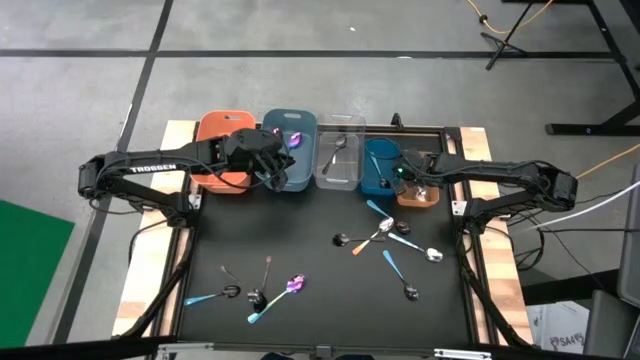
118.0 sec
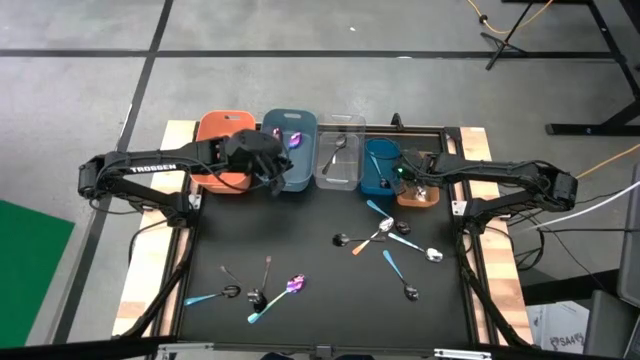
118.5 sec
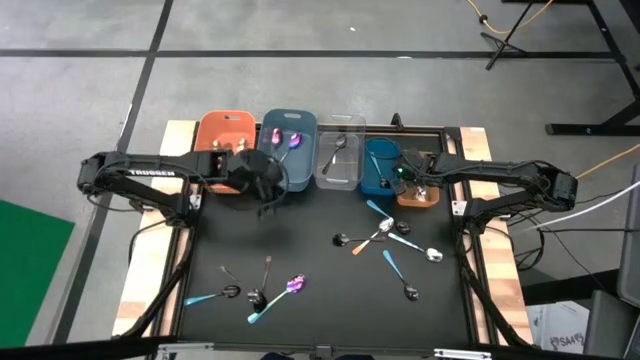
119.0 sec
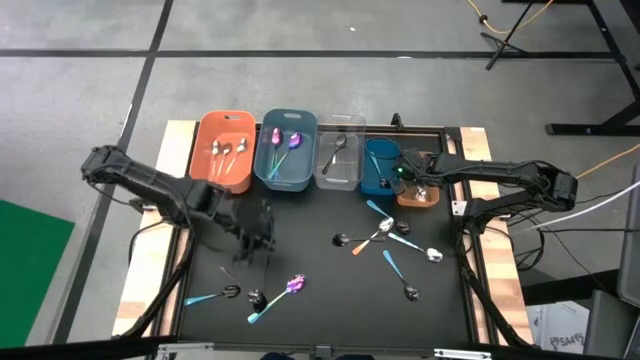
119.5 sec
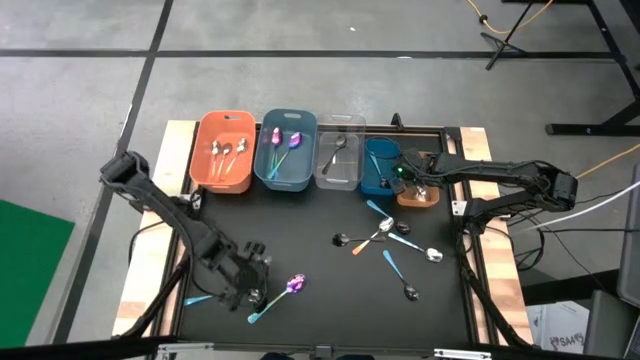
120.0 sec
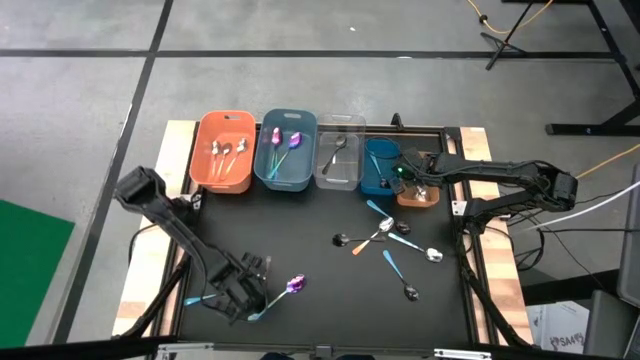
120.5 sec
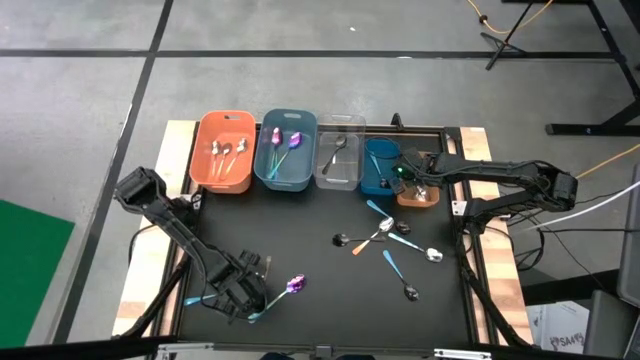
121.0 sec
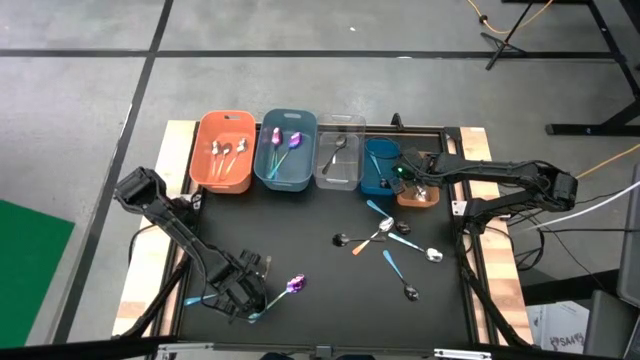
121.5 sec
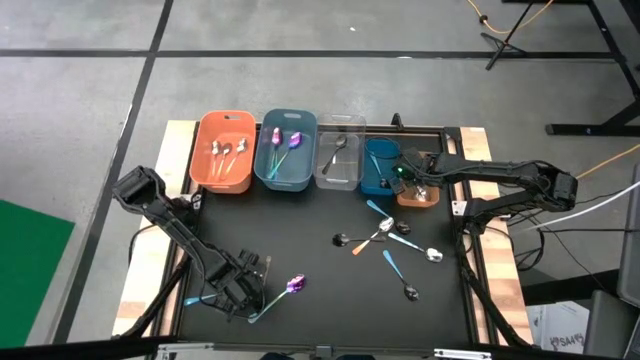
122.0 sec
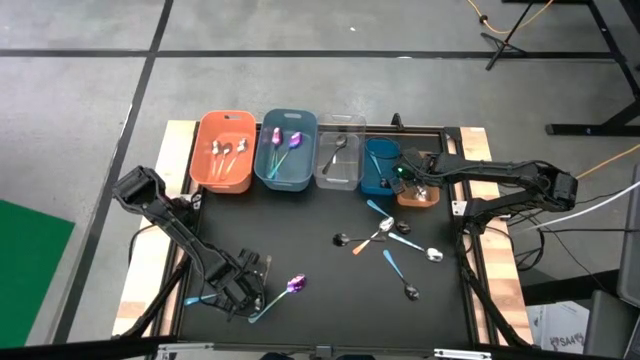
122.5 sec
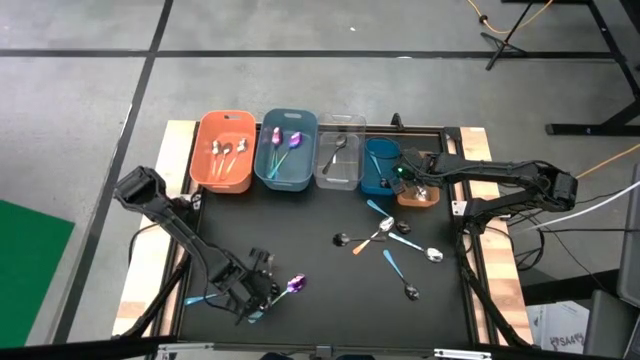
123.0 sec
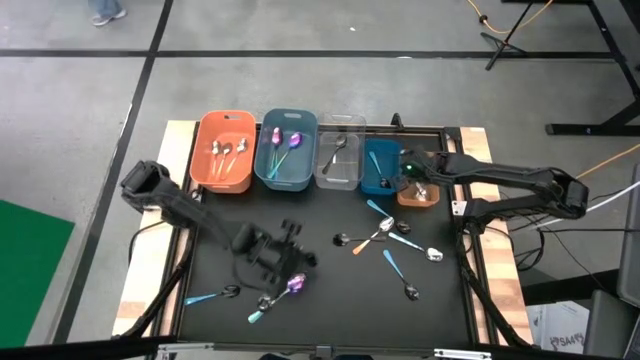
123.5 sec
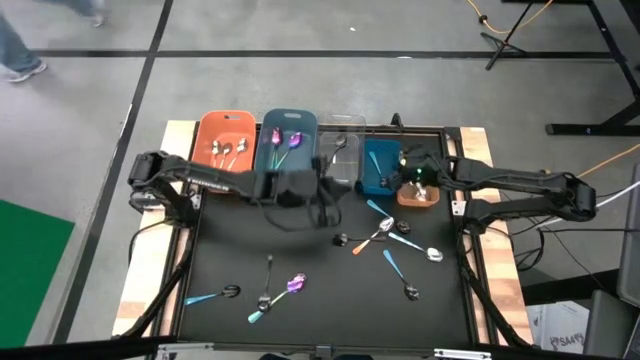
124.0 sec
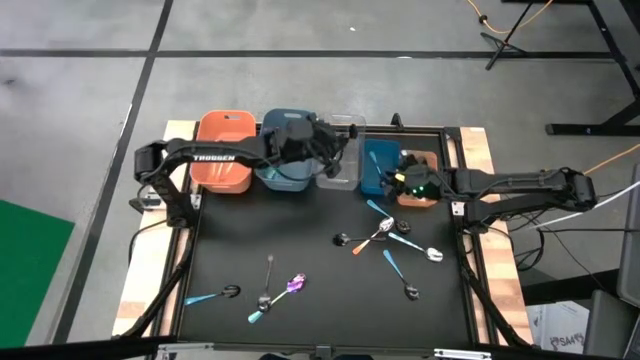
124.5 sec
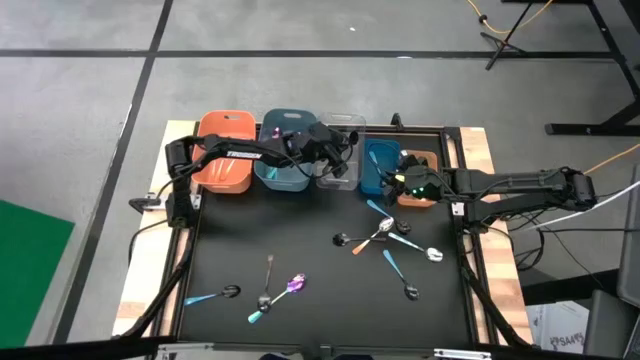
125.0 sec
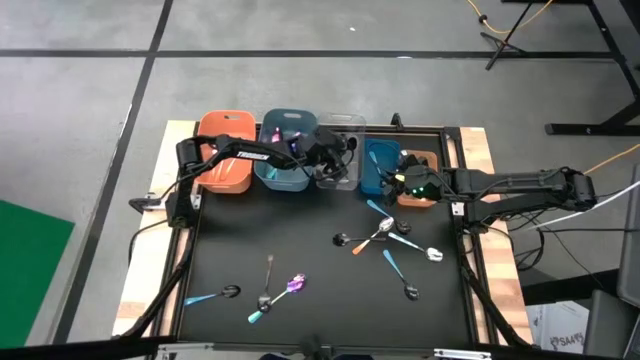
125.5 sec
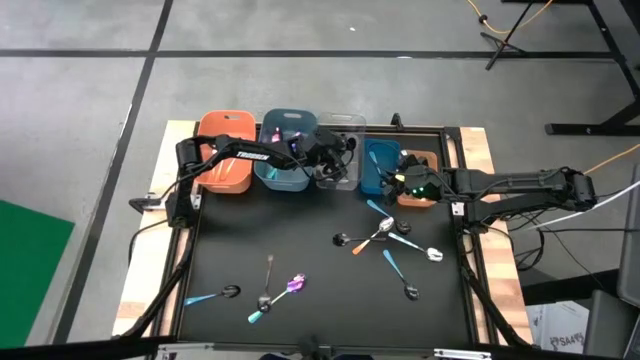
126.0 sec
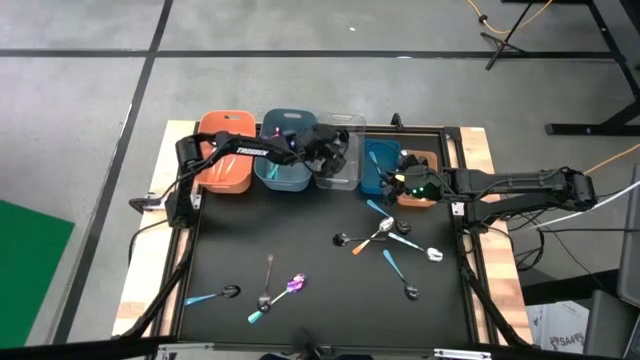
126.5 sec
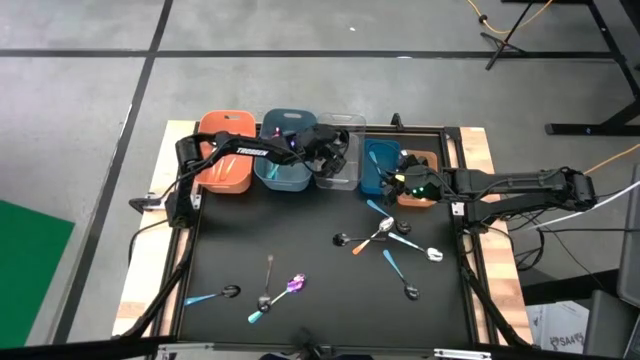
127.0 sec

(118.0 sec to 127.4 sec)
Task: Sort silverware by color (type)
Put the black spoon into the transparent bin

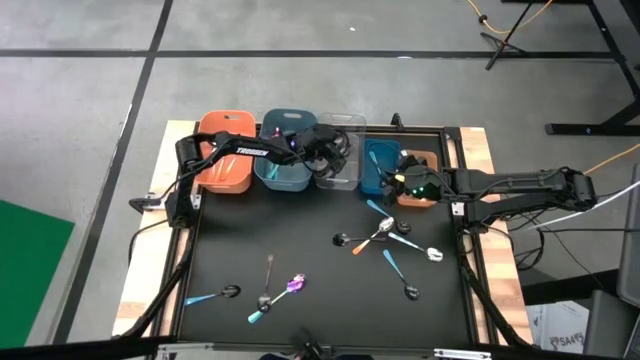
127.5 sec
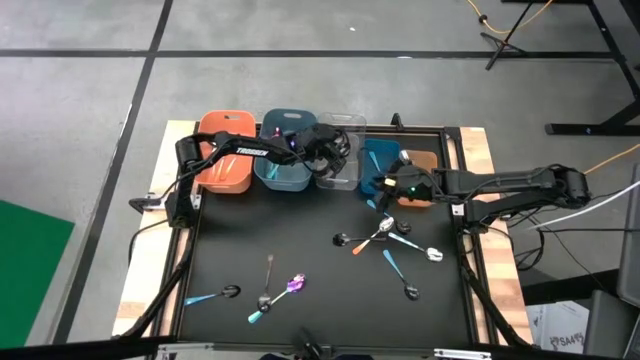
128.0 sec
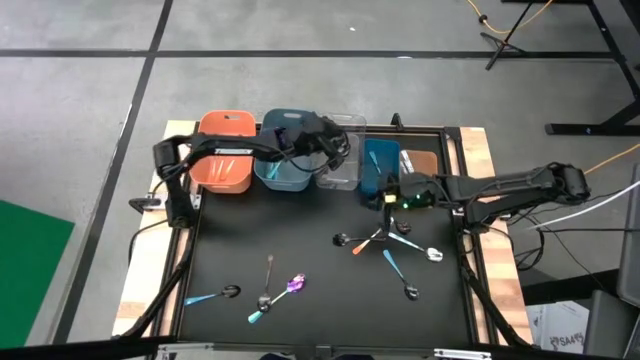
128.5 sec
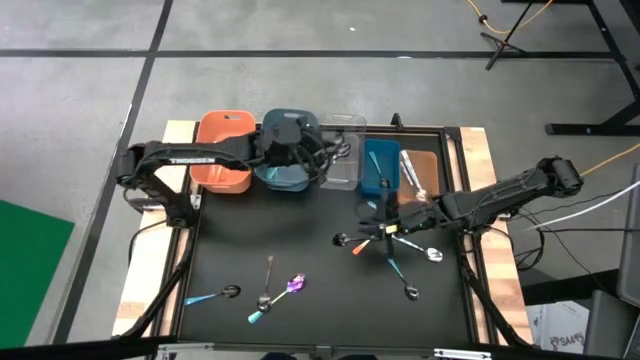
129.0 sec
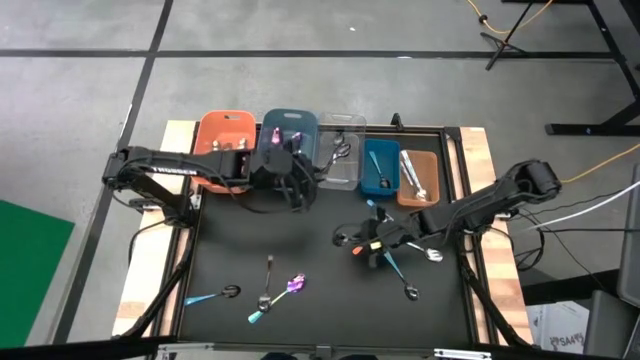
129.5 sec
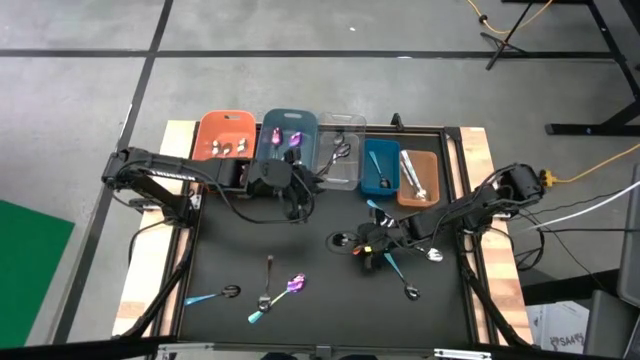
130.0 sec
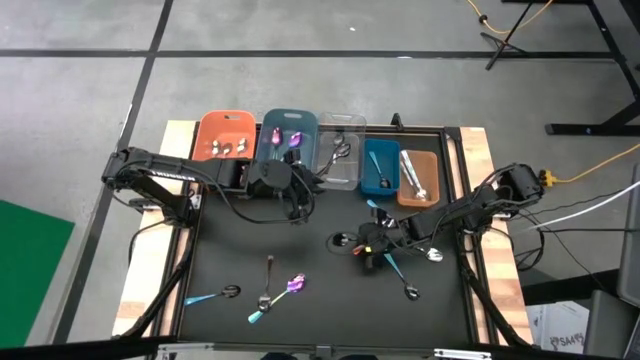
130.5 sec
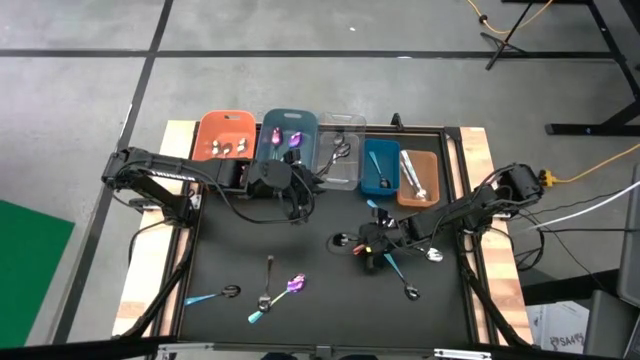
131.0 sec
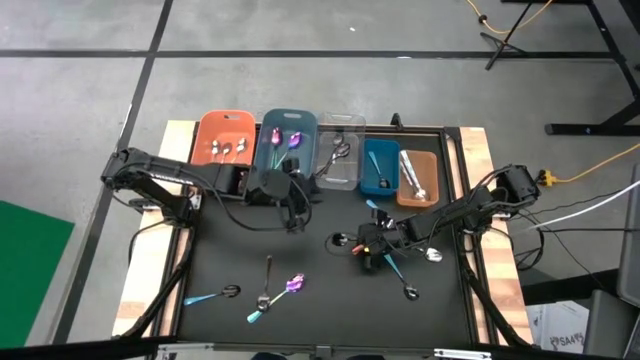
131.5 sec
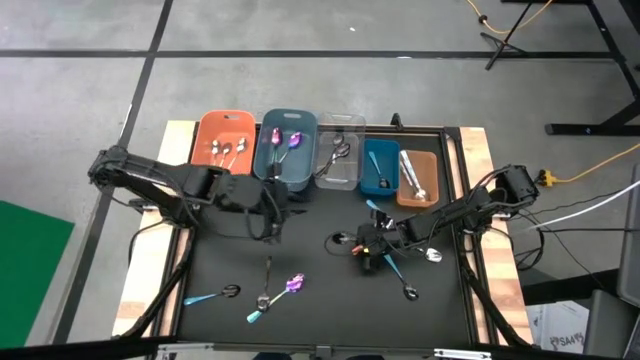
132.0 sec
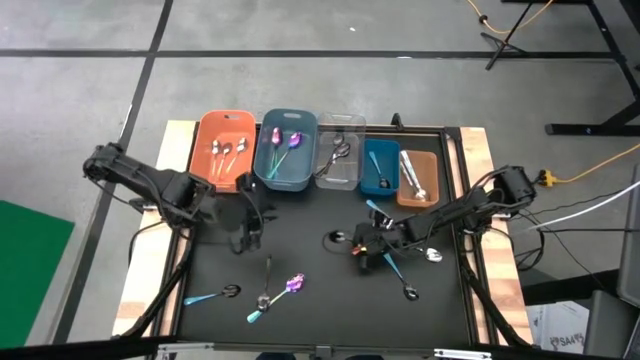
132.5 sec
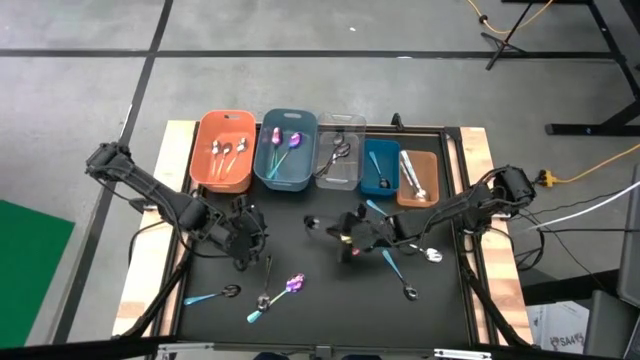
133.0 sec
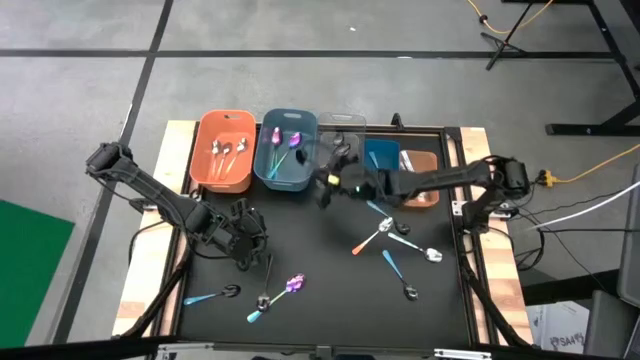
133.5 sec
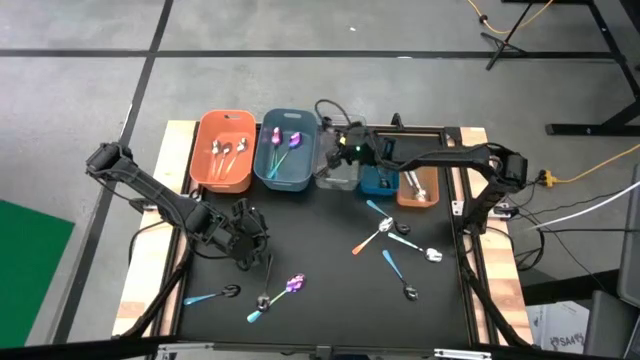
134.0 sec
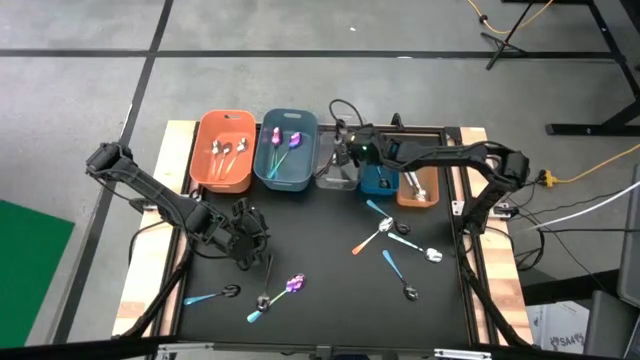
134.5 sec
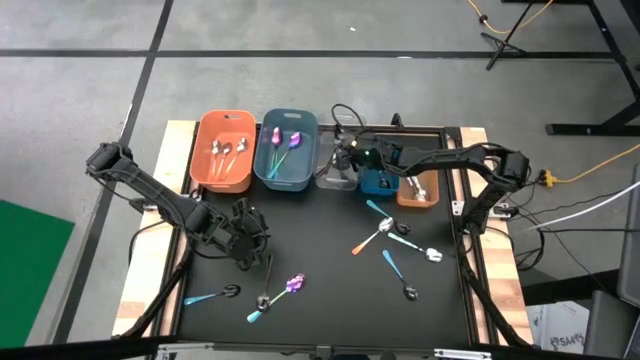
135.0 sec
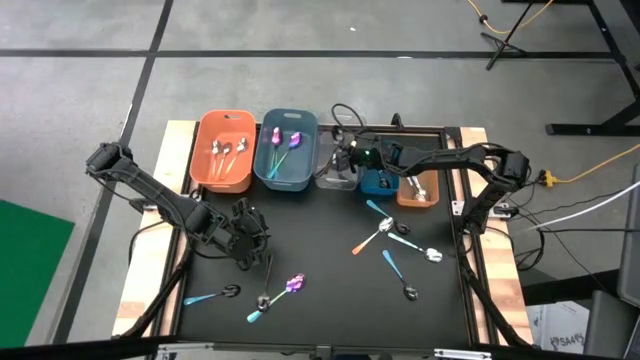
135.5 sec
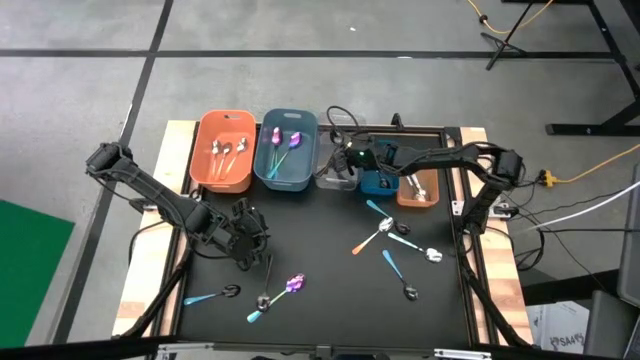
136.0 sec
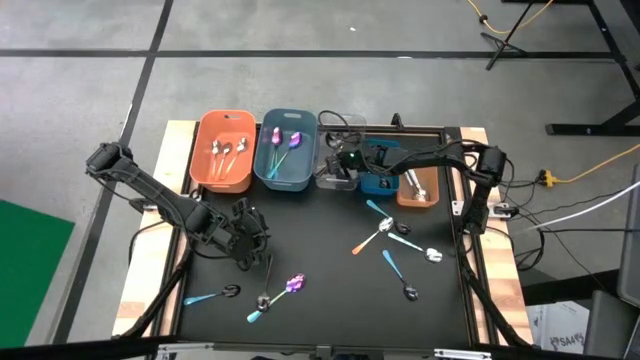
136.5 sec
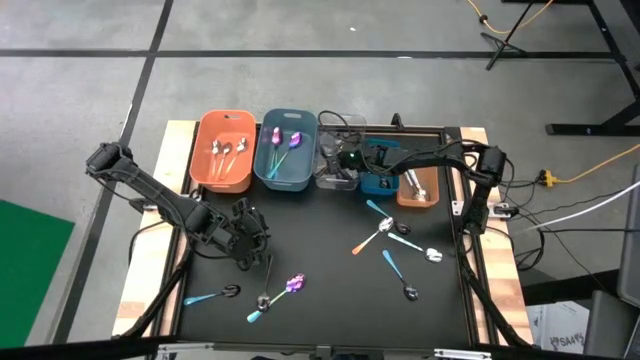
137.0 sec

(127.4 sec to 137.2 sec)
Put the black spoon into the transparent bin

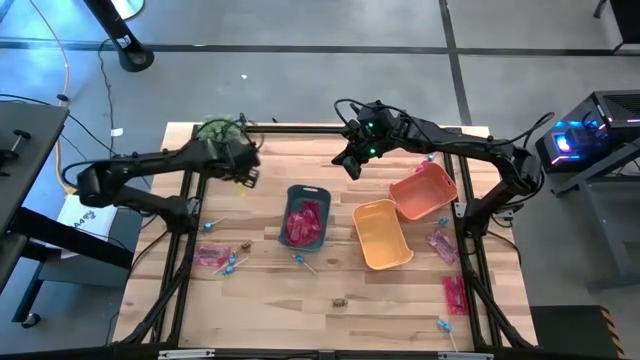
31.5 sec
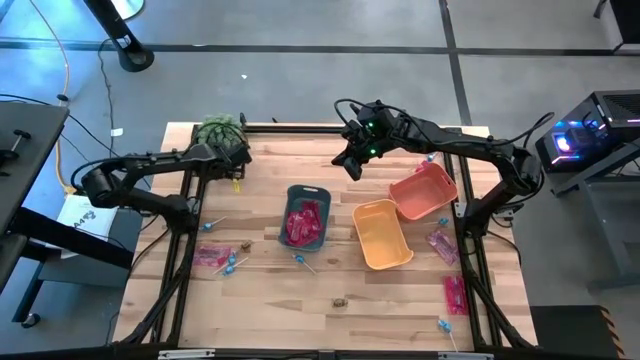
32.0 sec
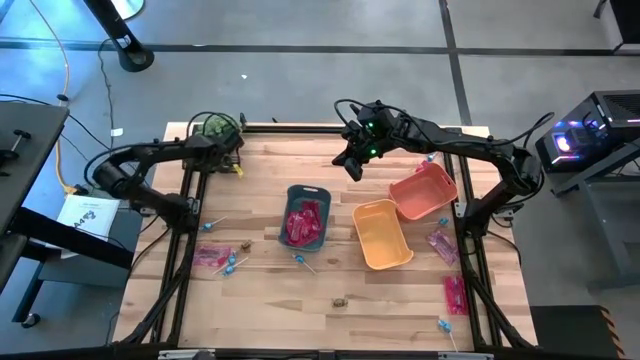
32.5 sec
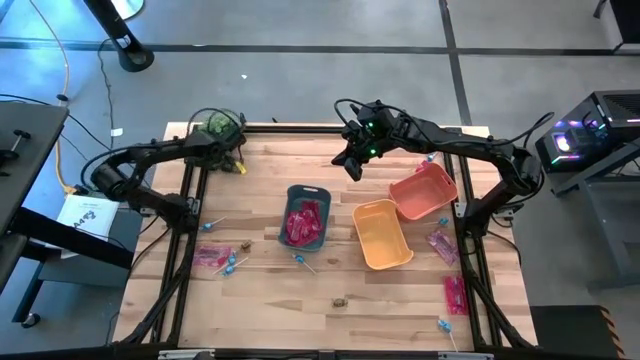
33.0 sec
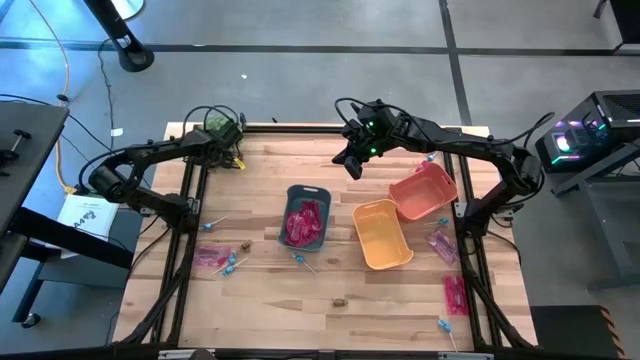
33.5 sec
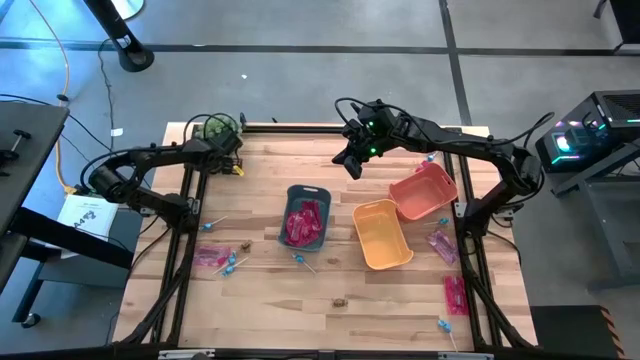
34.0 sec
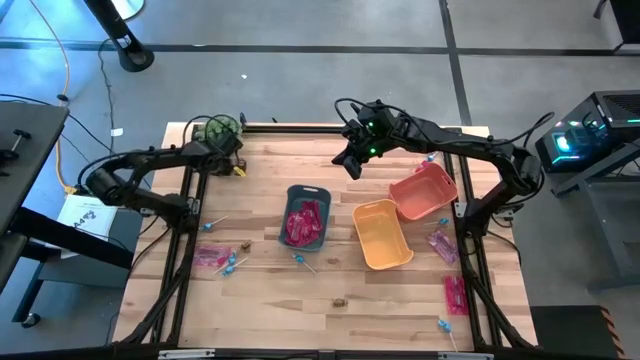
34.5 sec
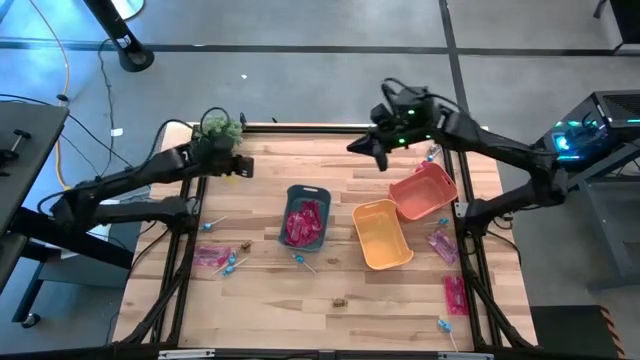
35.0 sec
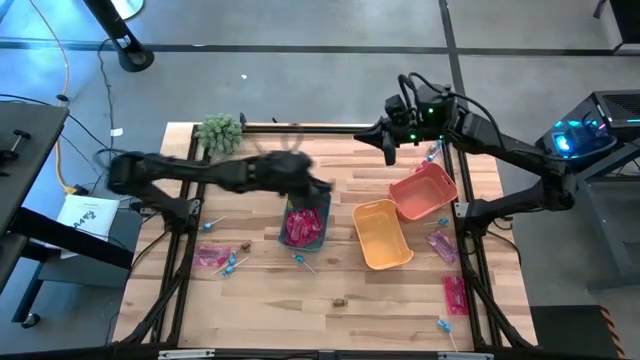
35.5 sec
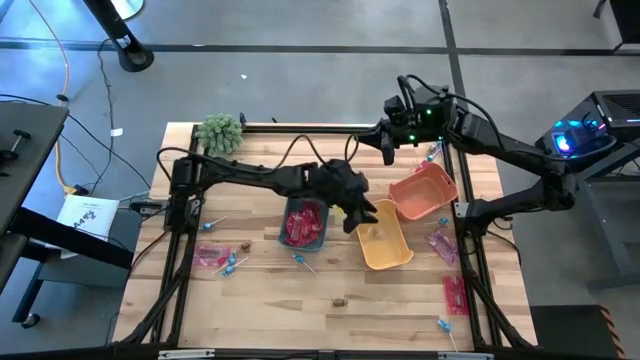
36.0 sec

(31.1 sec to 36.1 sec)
Task: Sort candy
Put the yellow candy into the yellow bin
